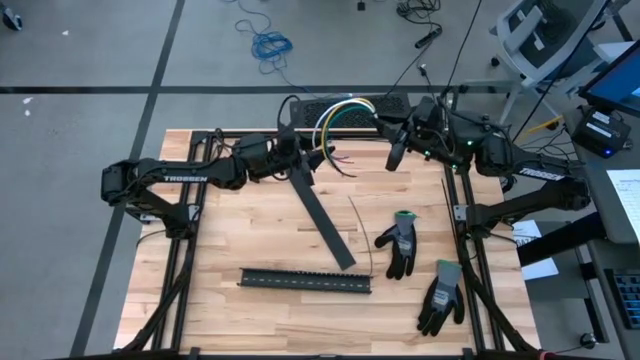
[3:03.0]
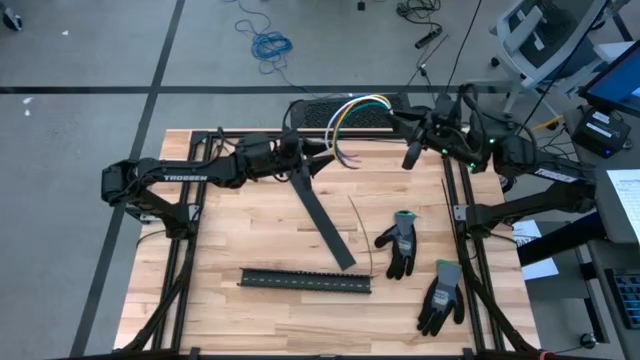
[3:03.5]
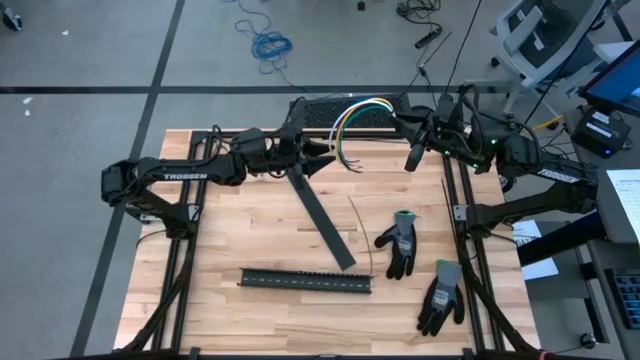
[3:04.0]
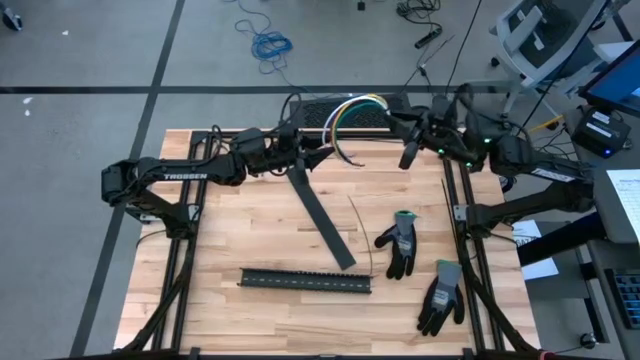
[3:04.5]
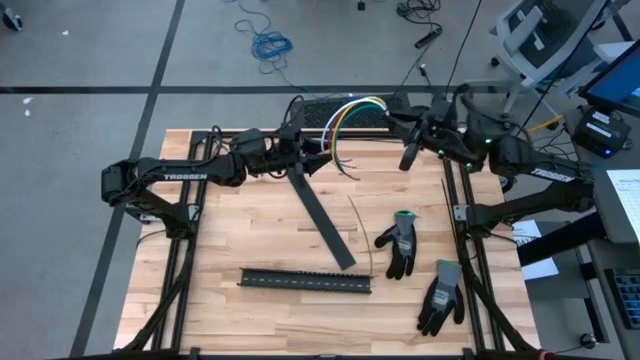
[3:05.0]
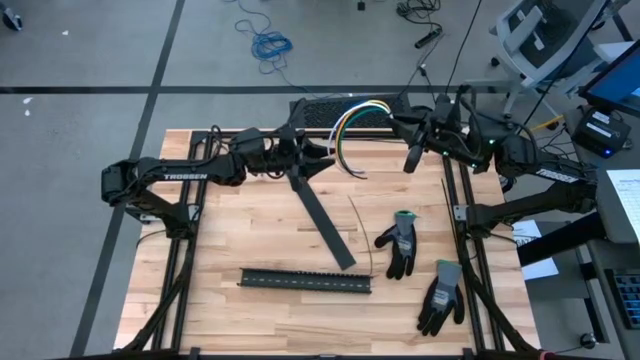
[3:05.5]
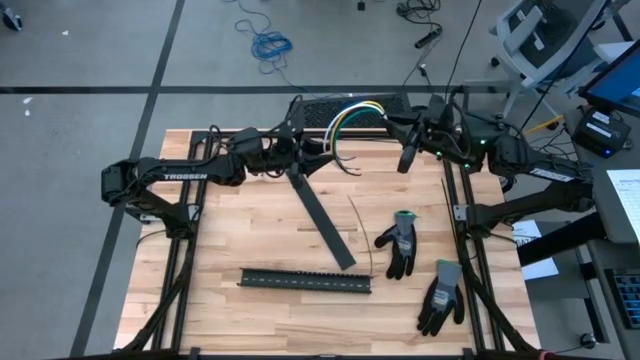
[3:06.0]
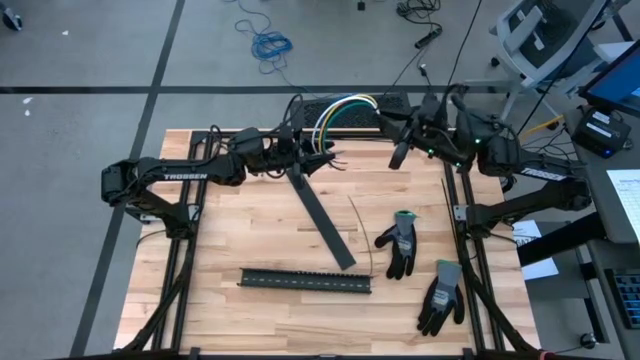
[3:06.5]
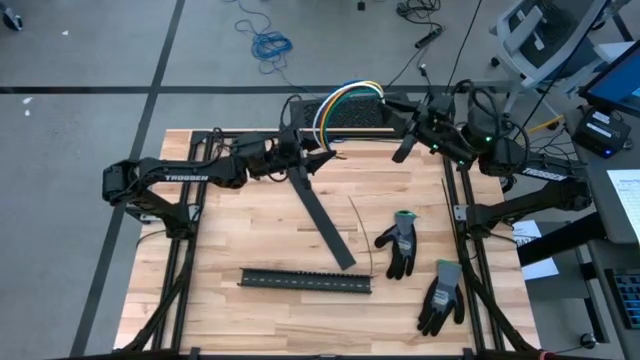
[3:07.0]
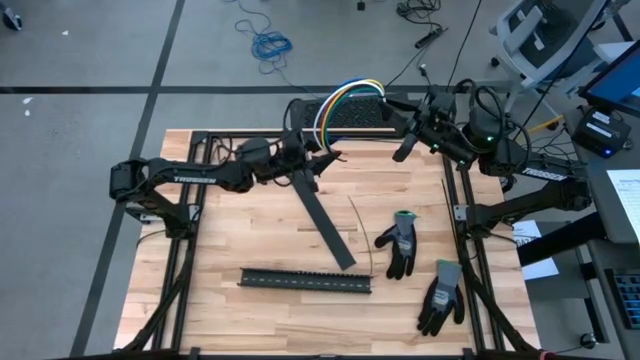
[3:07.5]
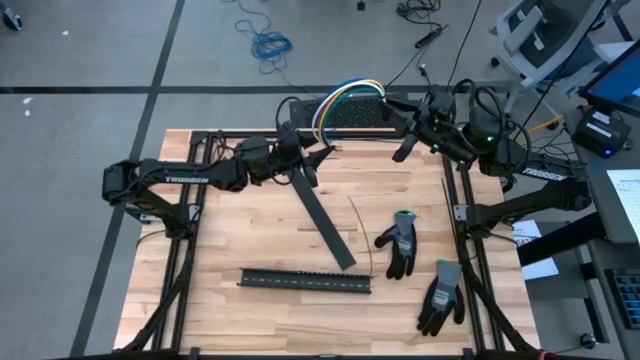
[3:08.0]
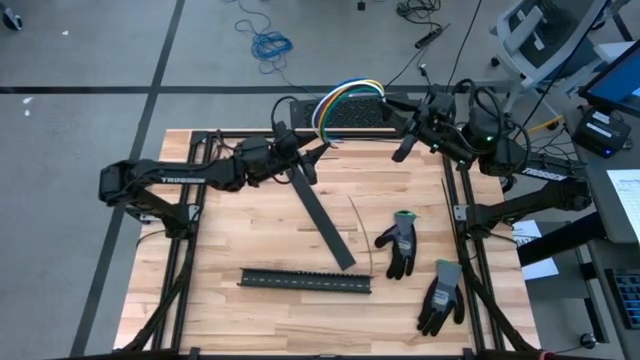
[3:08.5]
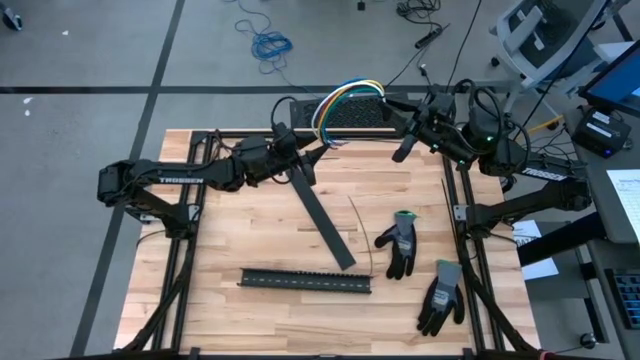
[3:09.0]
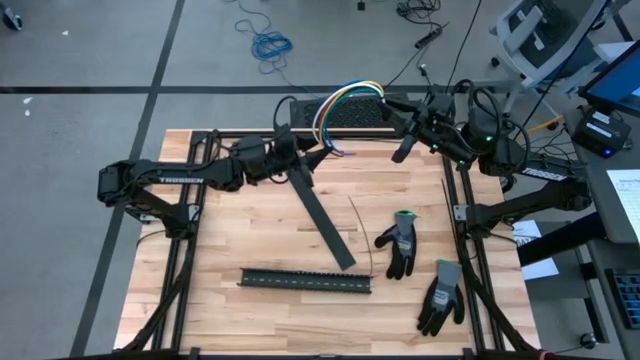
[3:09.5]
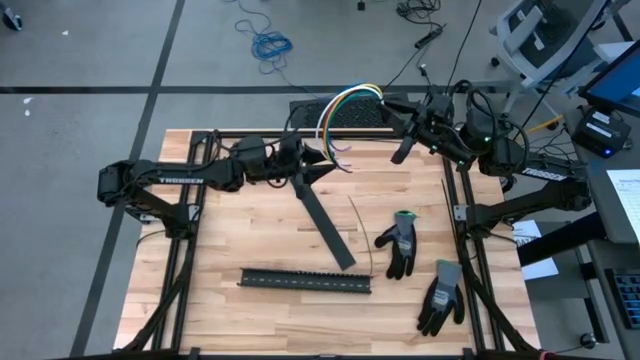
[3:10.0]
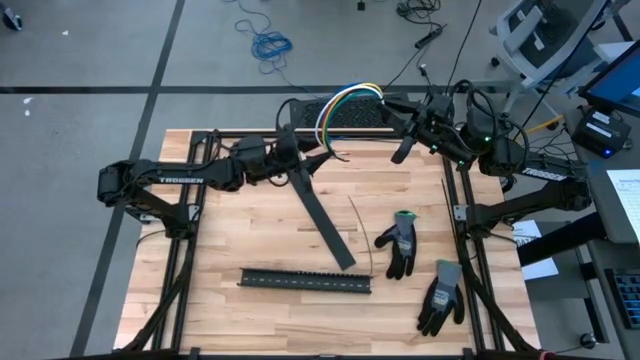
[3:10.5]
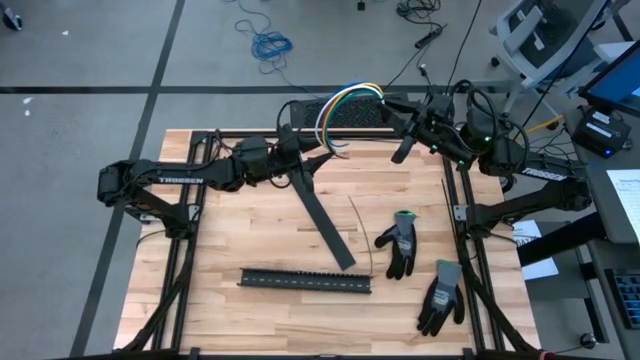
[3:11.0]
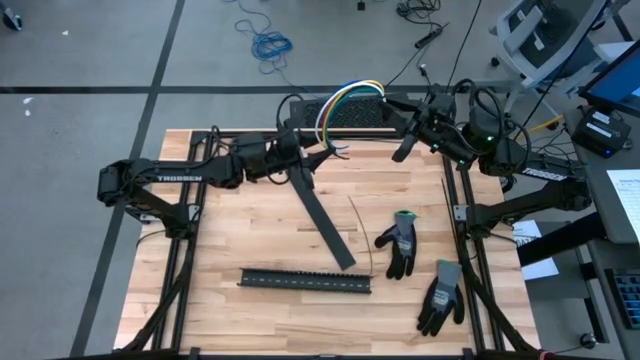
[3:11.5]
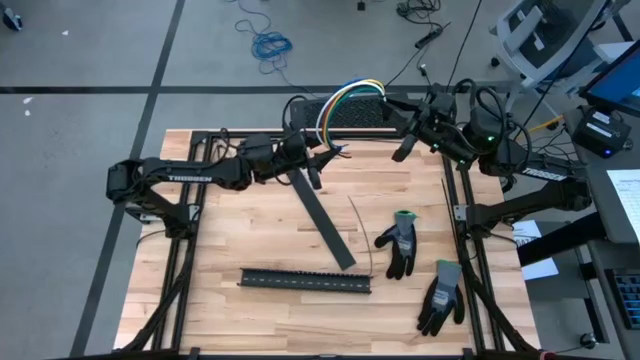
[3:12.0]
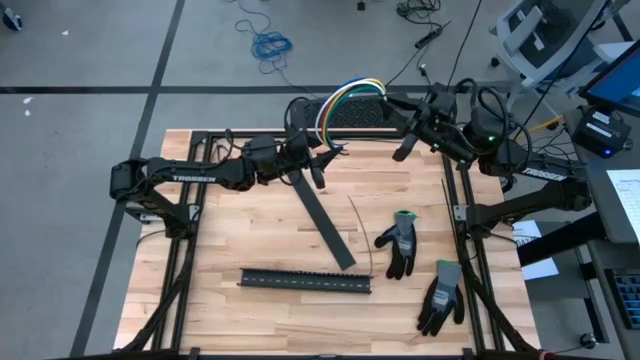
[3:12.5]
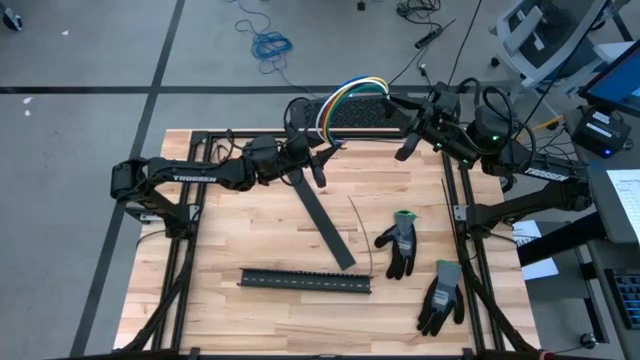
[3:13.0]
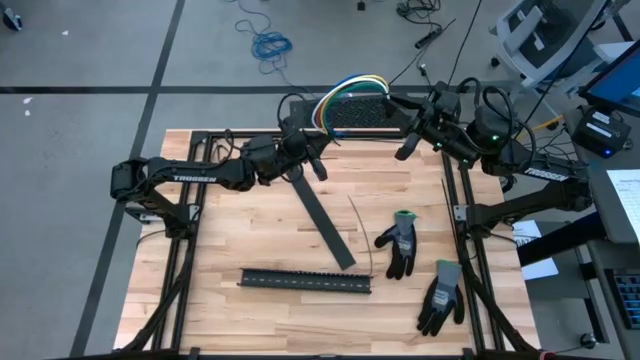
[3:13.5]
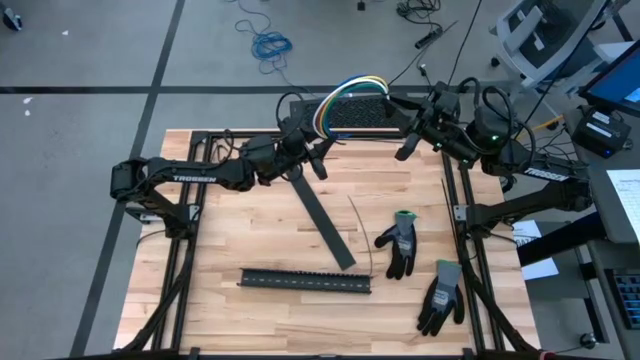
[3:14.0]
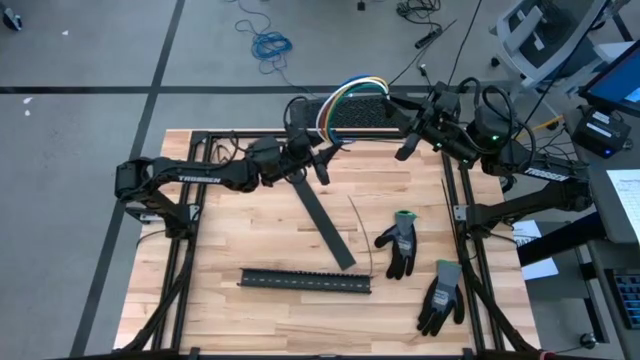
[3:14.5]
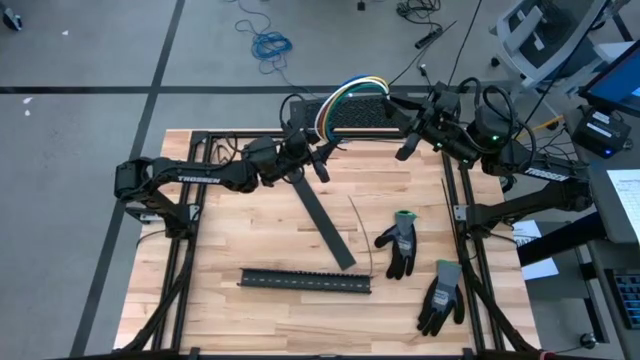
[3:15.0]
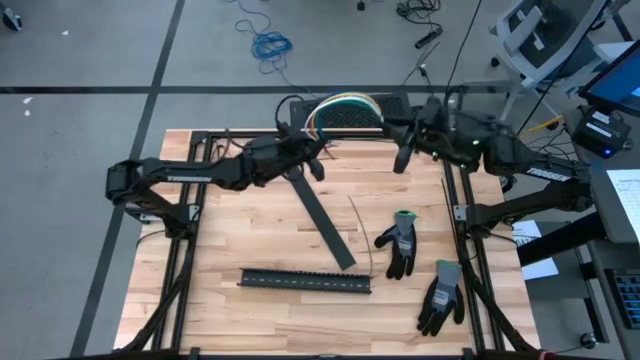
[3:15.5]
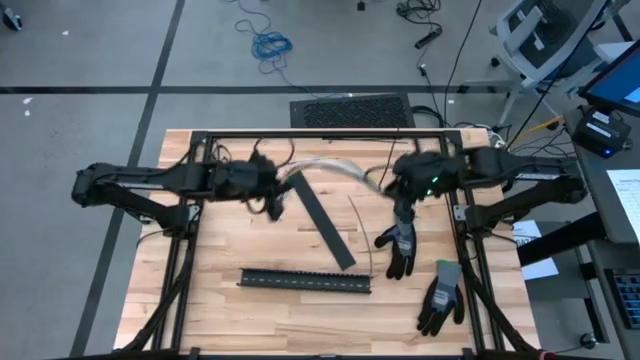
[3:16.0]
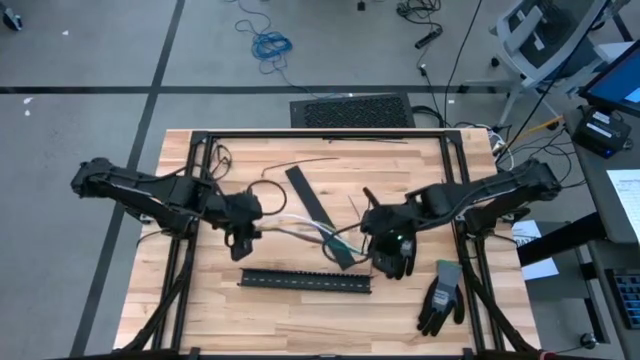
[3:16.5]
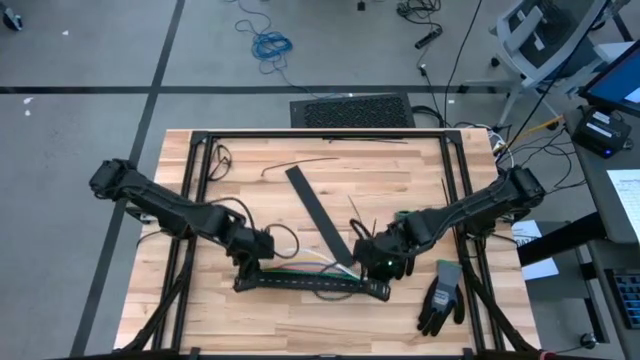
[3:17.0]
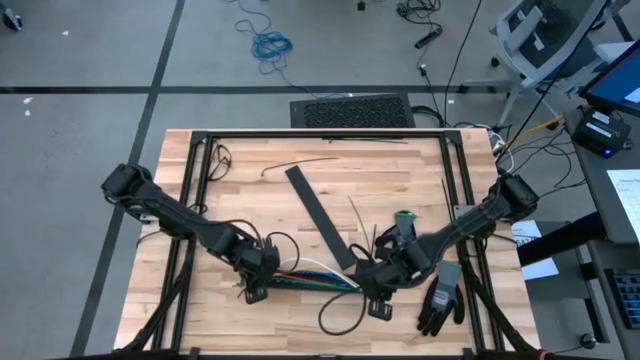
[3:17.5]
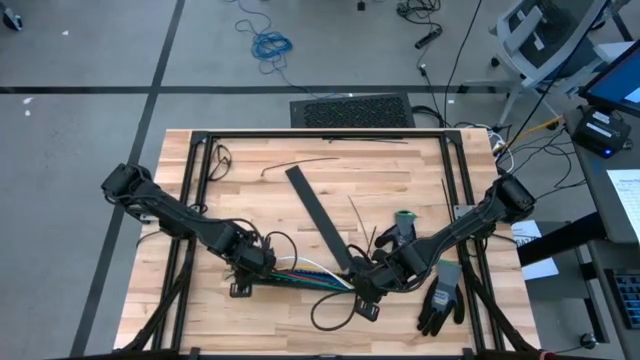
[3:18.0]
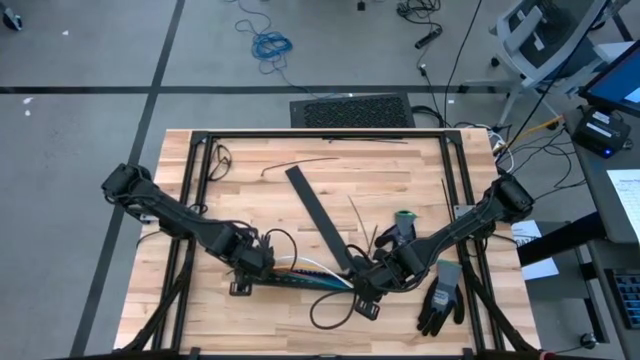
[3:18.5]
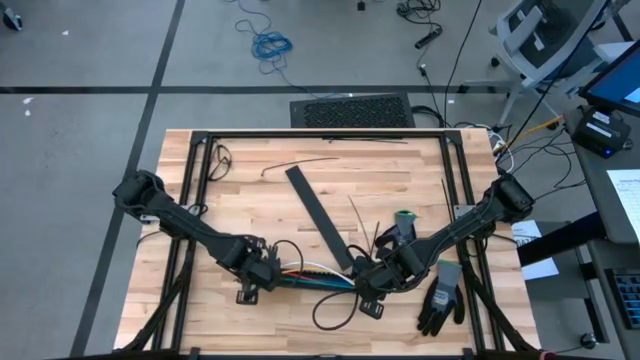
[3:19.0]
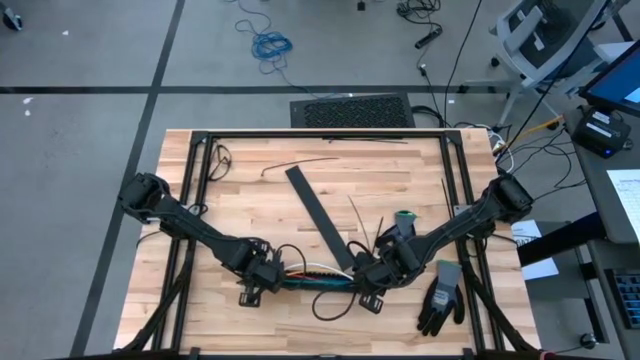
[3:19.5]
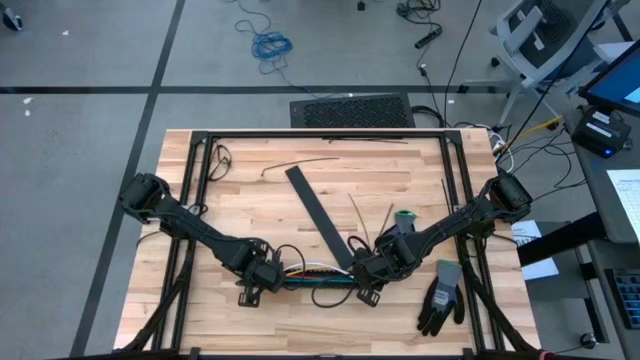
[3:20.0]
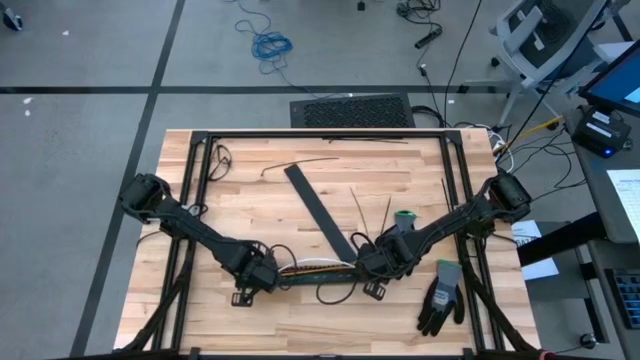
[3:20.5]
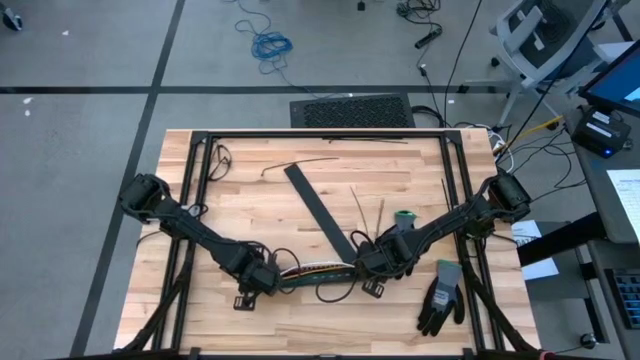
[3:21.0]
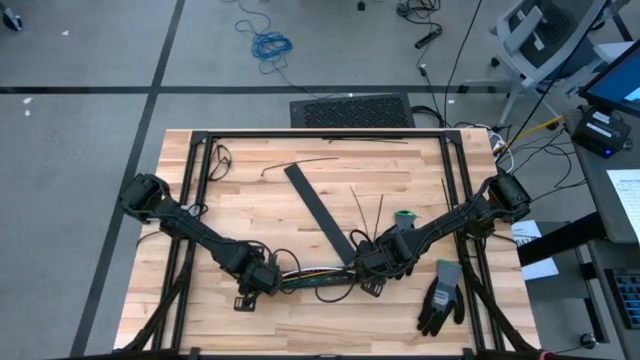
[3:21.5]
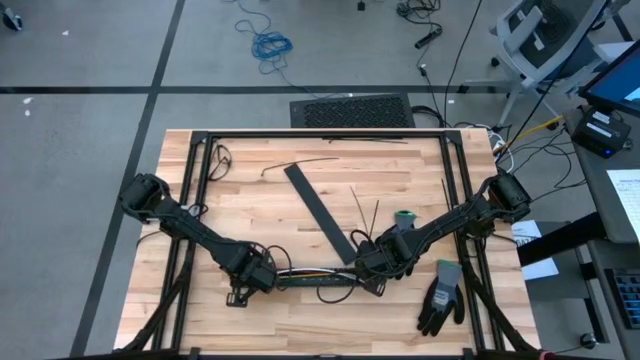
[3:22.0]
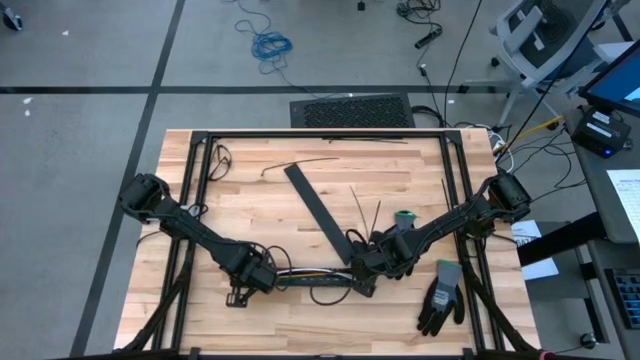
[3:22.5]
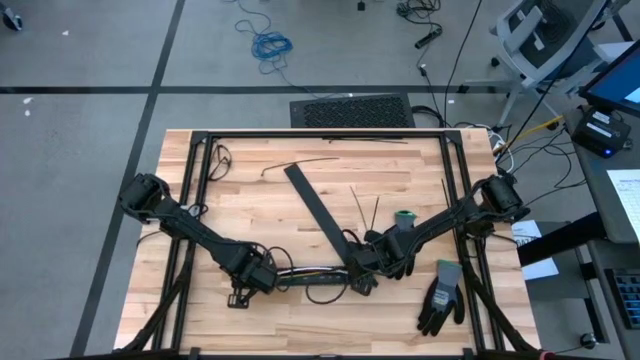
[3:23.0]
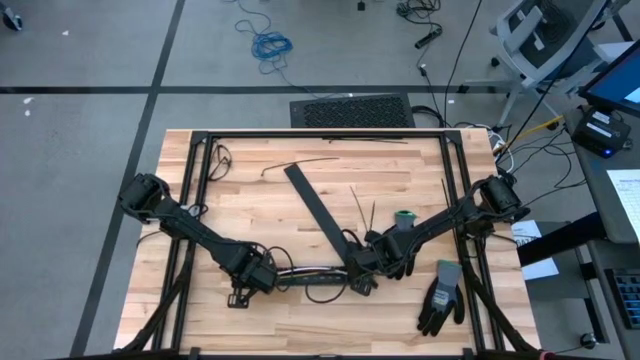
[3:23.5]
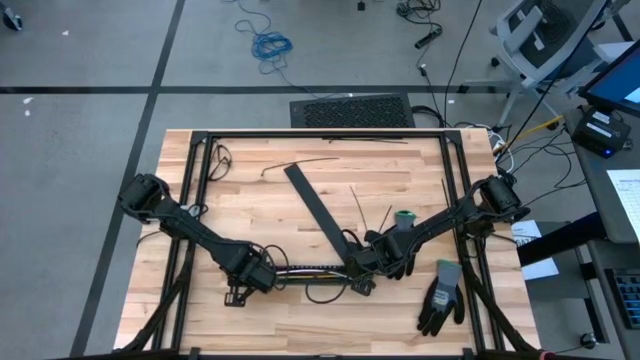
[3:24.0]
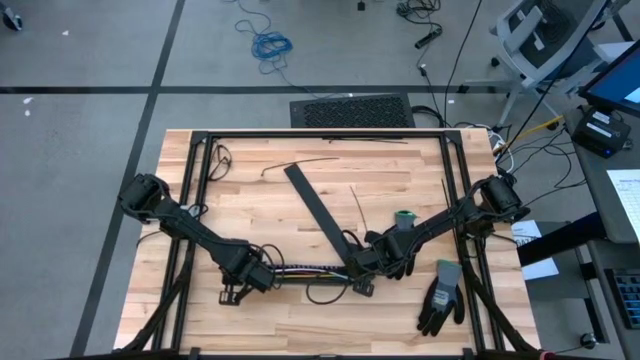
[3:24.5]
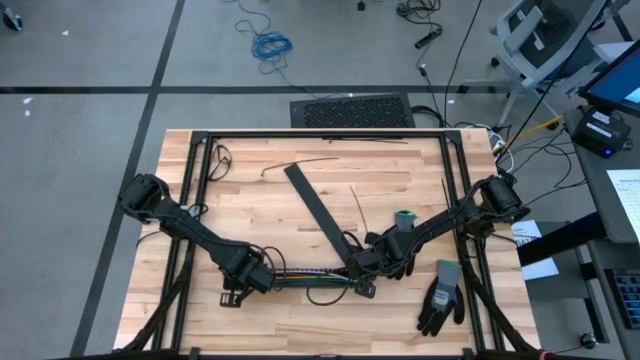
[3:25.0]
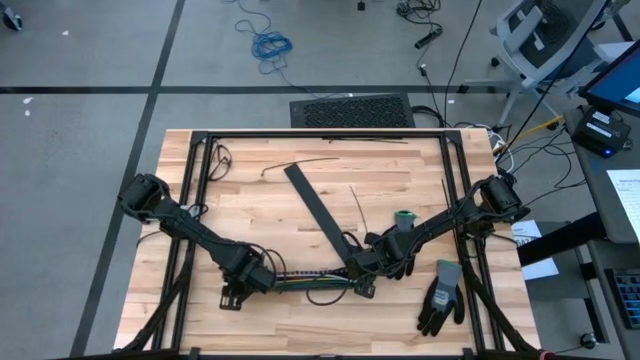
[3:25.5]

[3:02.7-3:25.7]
Task: Ziptie cables
Put the zip-tied cables in the black cable duct
